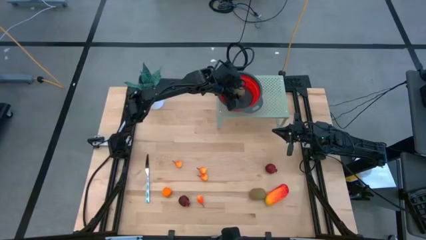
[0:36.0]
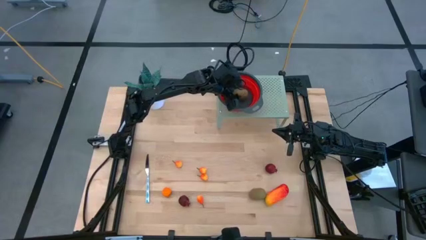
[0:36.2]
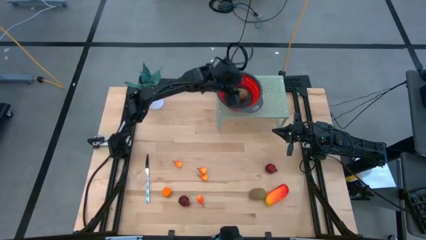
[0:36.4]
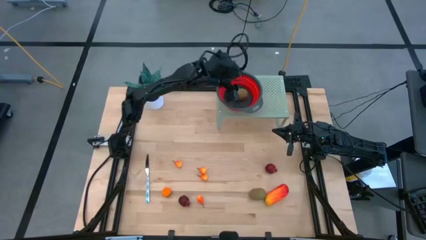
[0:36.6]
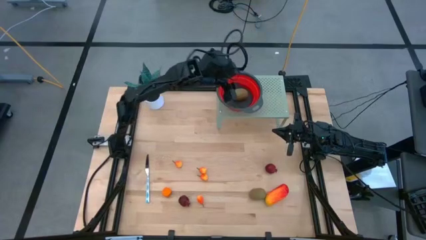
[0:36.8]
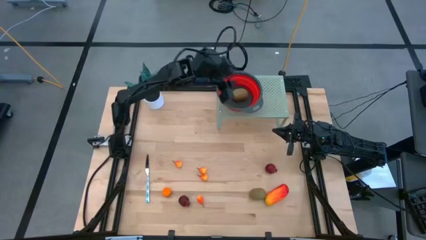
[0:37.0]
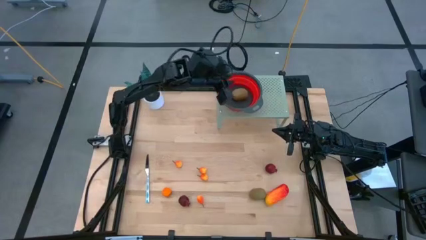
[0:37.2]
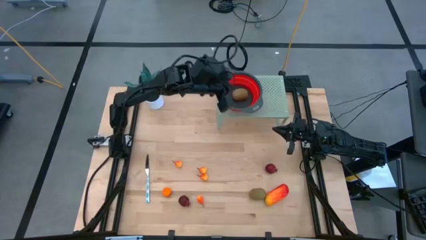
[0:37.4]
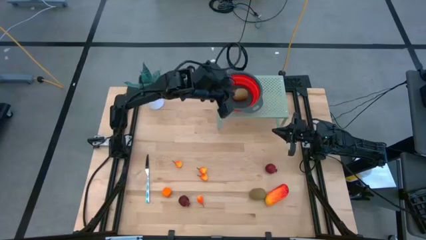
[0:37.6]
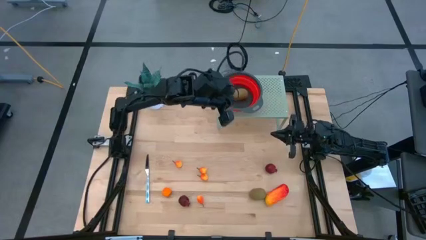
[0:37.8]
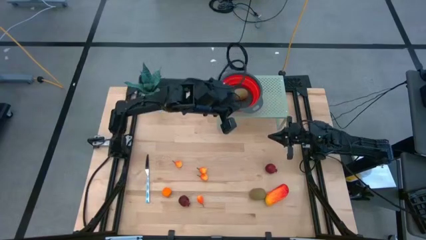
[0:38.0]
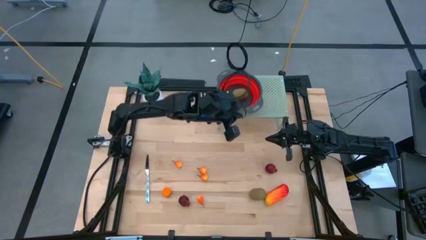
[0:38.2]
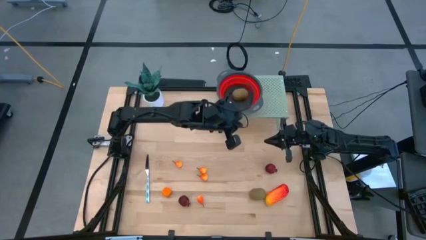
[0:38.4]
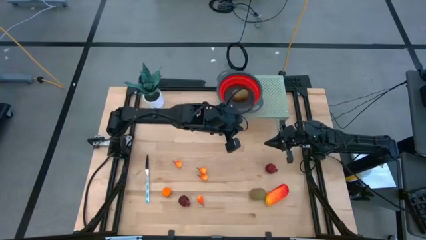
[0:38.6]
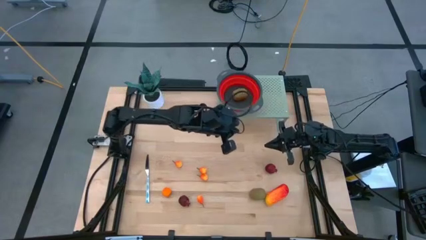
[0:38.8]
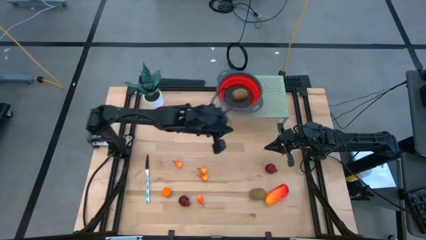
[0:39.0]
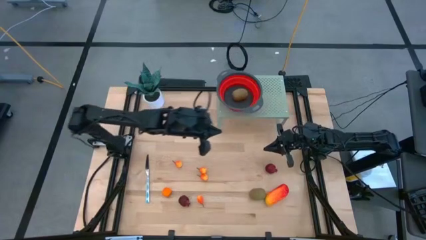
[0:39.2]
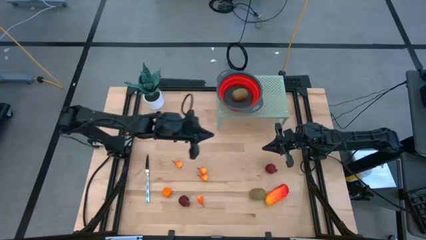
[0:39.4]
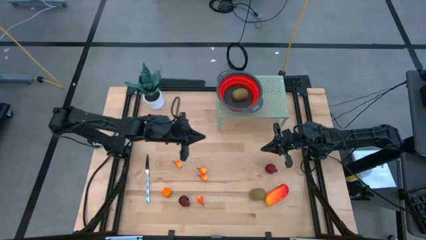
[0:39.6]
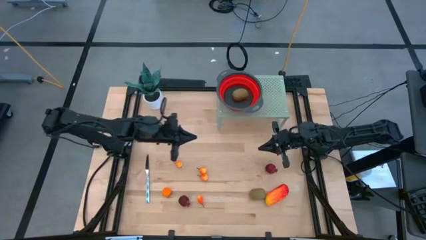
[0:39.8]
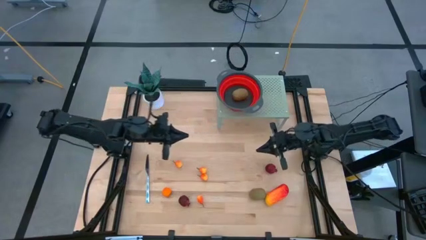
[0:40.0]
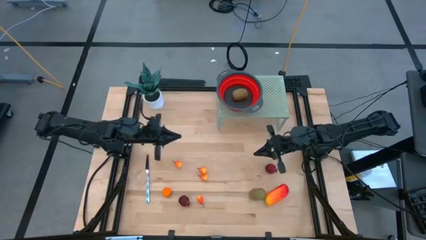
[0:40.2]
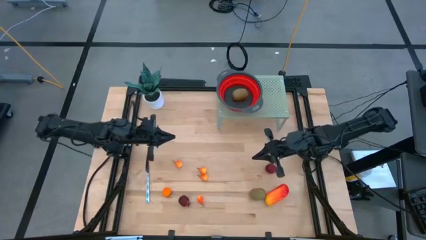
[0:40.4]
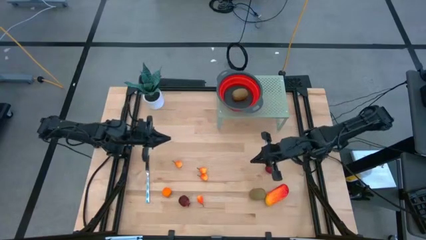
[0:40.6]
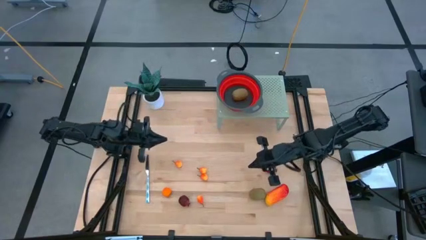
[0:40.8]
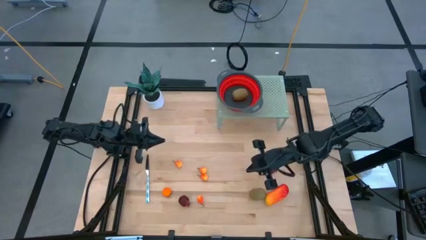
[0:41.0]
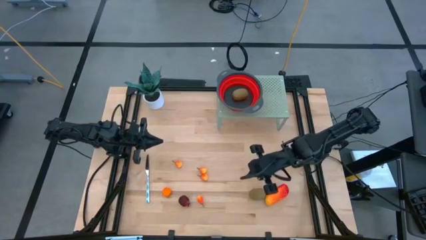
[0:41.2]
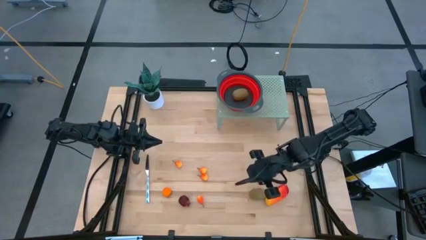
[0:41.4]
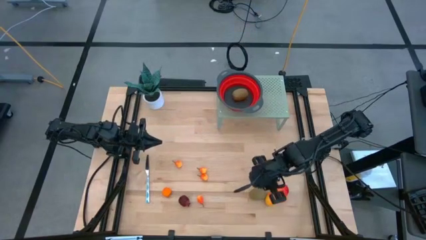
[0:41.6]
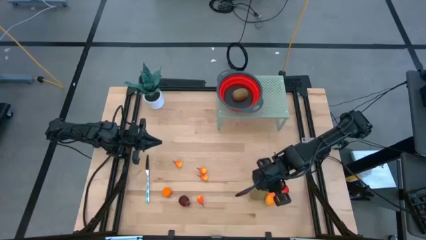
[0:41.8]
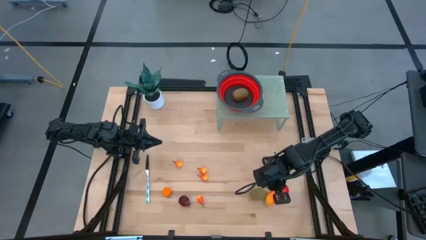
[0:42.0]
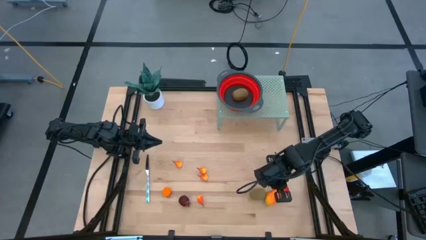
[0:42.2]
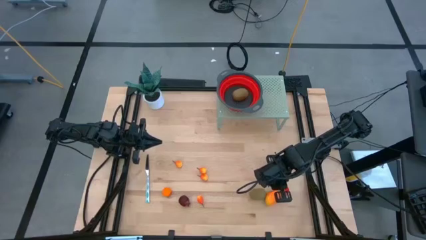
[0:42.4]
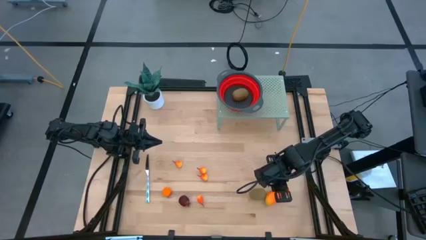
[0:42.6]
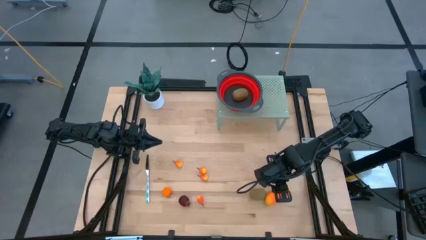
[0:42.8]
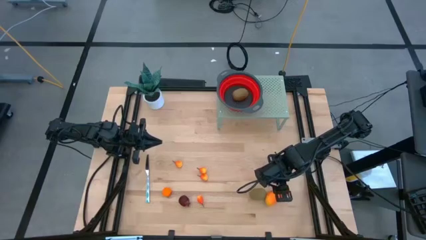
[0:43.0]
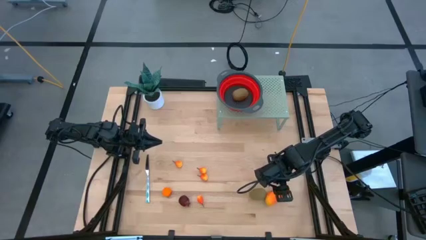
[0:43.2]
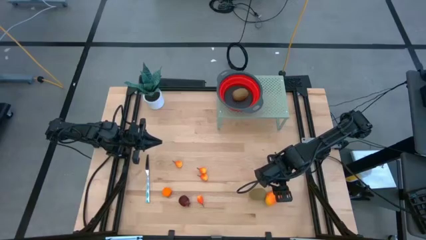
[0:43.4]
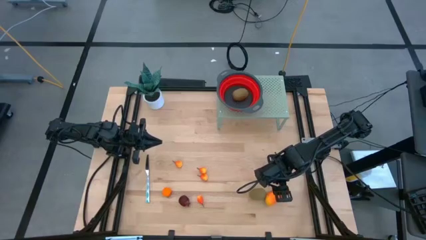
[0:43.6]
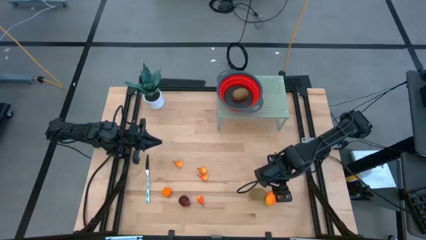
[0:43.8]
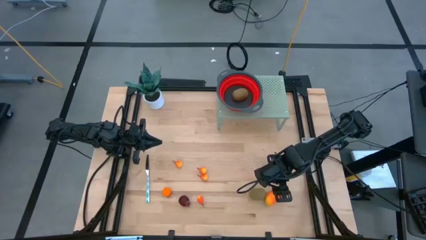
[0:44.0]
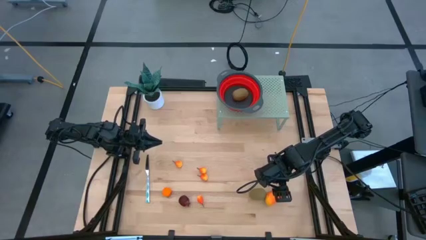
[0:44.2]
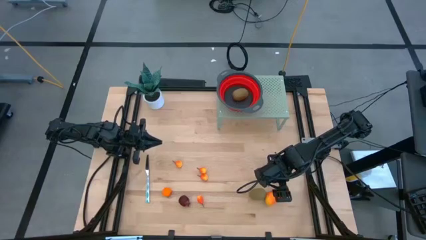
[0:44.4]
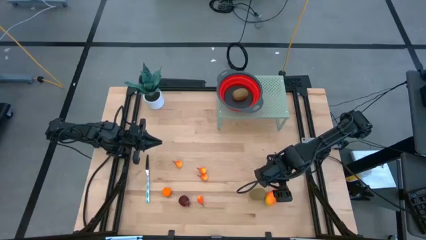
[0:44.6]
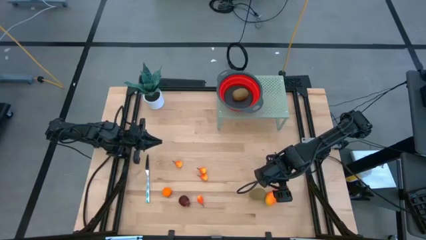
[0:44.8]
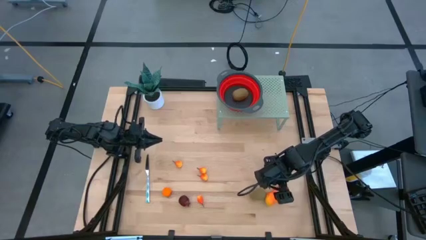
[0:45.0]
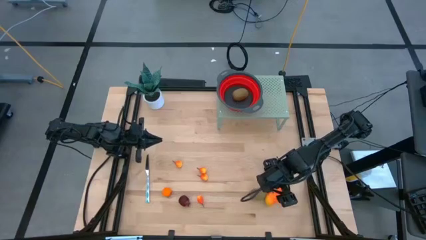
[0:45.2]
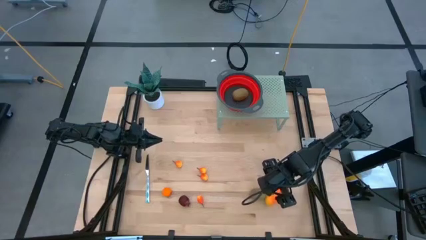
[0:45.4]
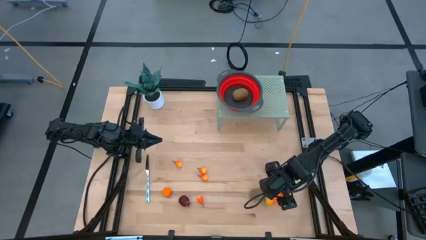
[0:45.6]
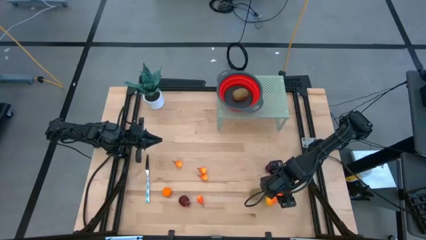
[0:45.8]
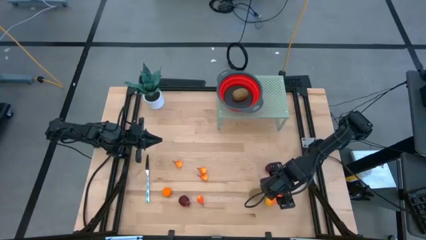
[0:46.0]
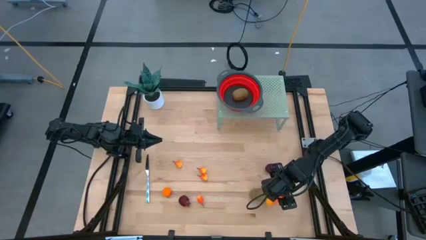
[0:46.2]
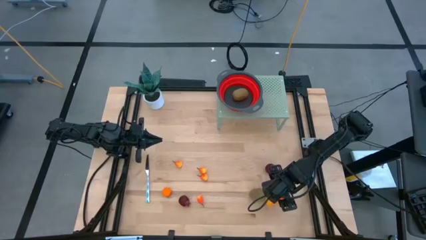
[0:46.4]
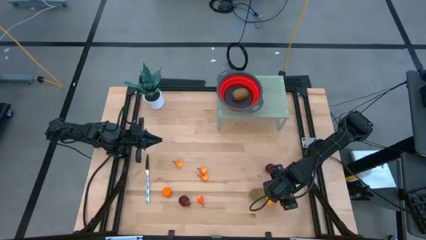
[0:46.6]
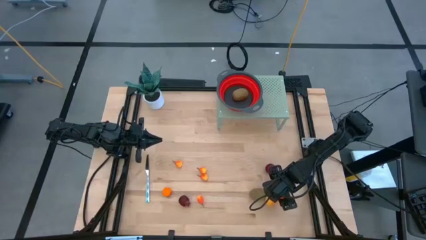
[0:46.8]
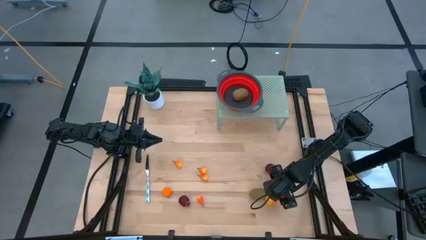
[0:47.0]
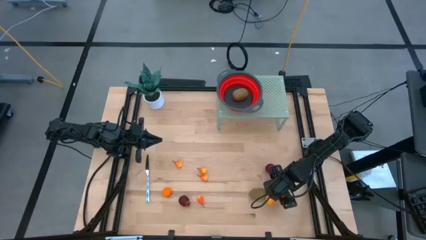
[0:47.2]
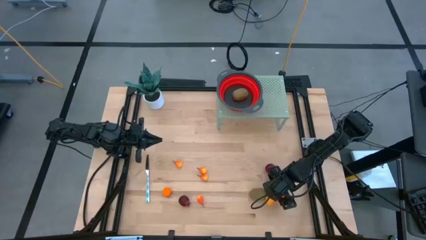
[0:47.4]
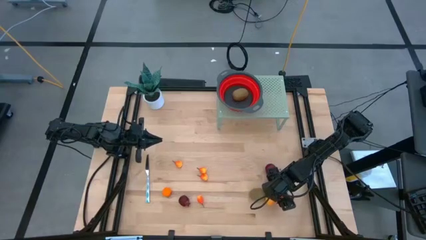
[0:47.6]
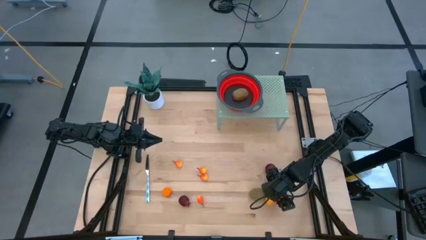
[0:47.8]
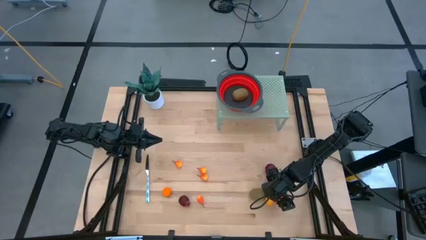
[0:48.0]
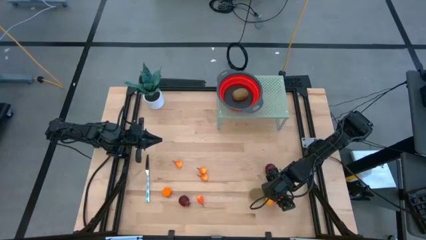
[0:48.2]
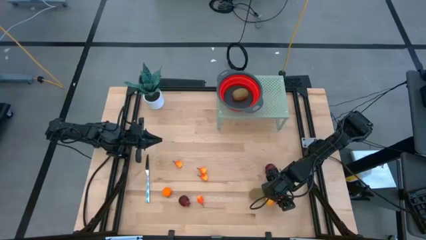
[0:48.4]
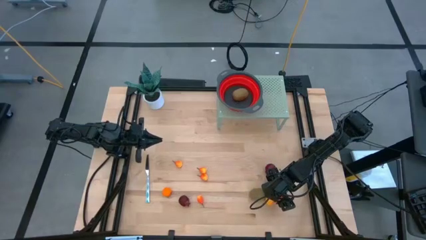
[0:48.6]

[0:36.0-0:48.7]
Task: Pick & Place Fruit
Put the orange mango into the red strainer bowl on the shelf
